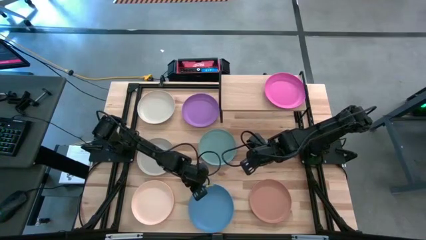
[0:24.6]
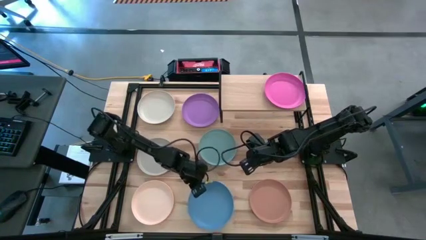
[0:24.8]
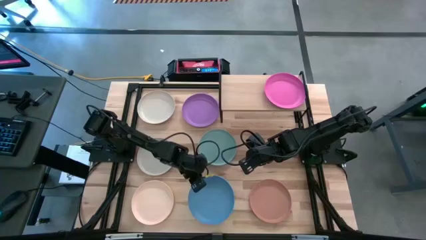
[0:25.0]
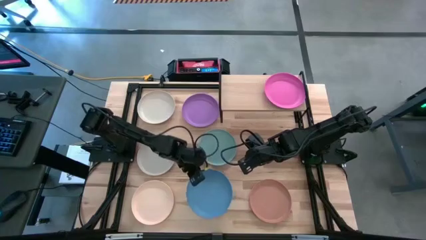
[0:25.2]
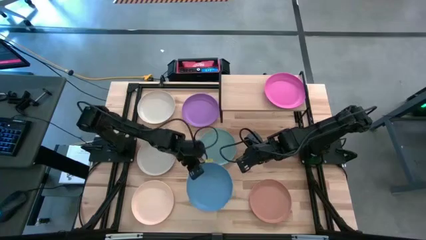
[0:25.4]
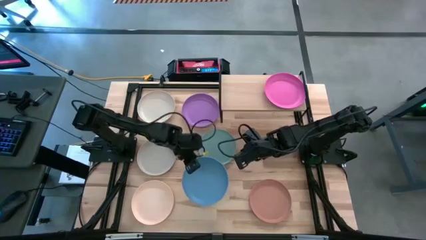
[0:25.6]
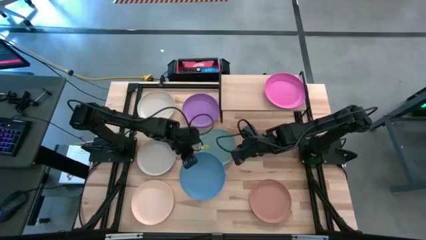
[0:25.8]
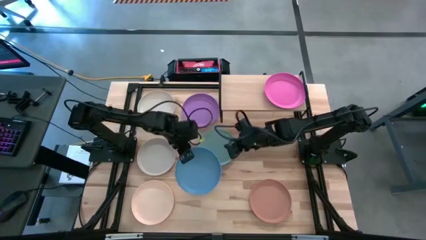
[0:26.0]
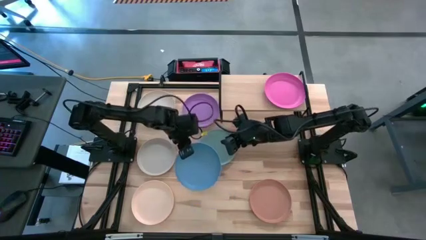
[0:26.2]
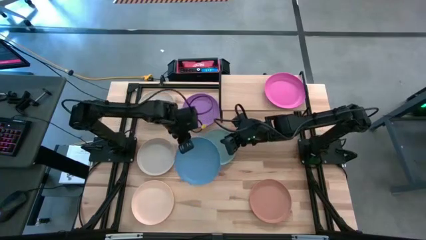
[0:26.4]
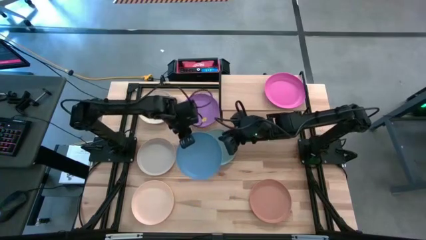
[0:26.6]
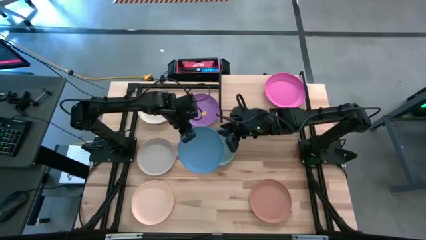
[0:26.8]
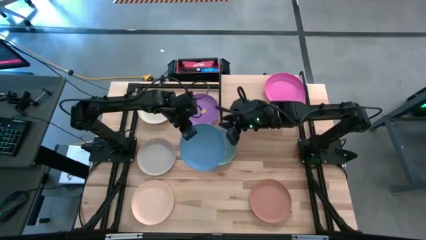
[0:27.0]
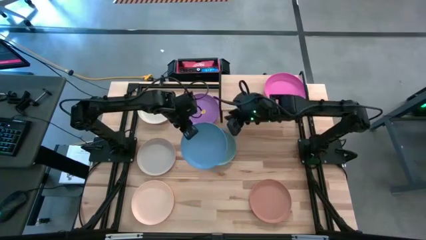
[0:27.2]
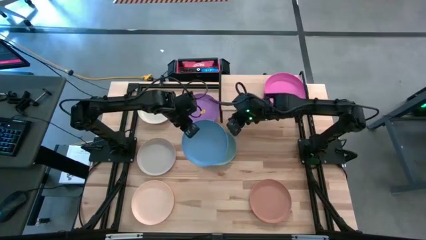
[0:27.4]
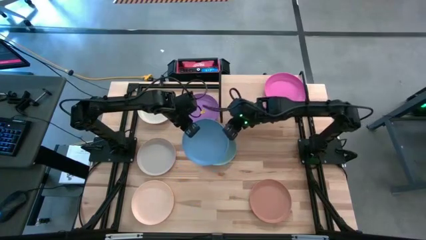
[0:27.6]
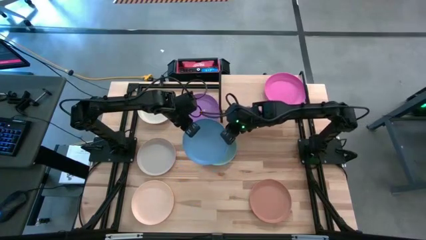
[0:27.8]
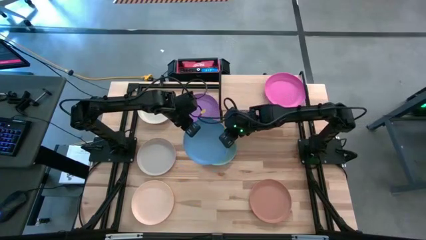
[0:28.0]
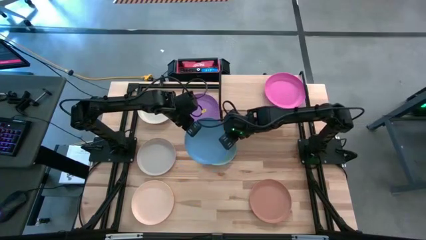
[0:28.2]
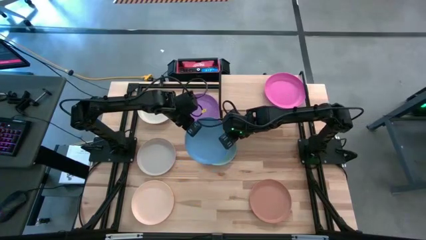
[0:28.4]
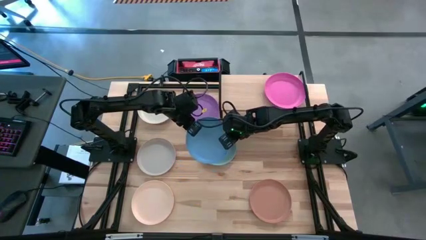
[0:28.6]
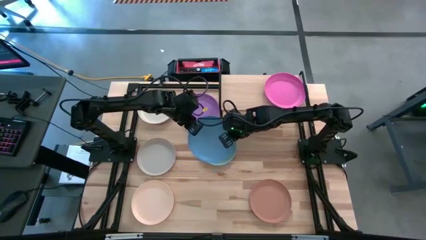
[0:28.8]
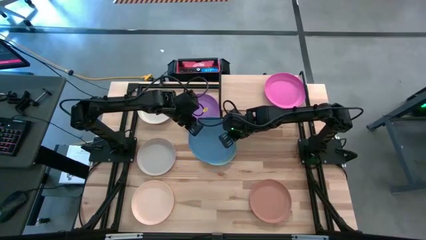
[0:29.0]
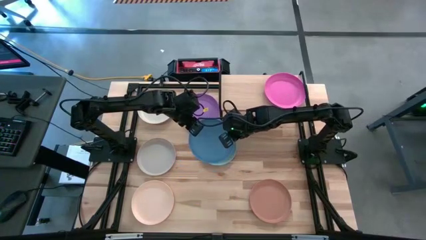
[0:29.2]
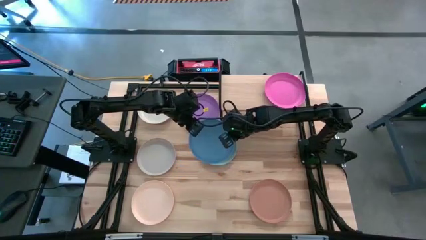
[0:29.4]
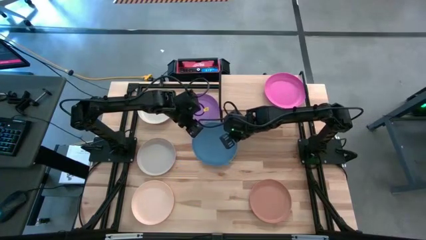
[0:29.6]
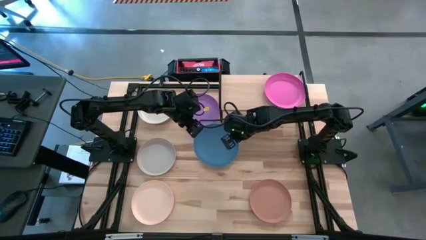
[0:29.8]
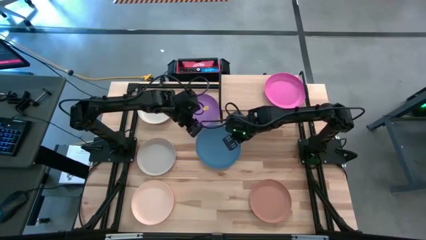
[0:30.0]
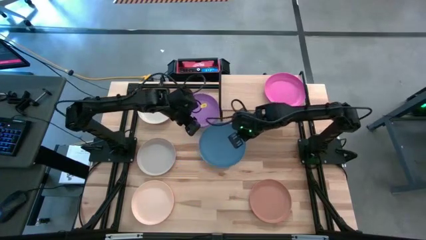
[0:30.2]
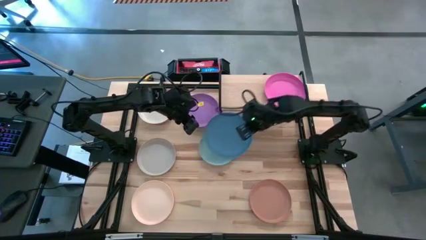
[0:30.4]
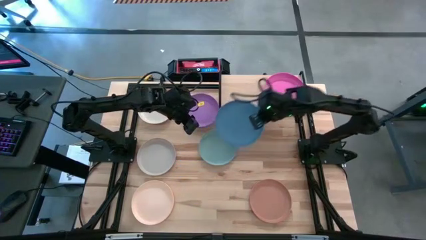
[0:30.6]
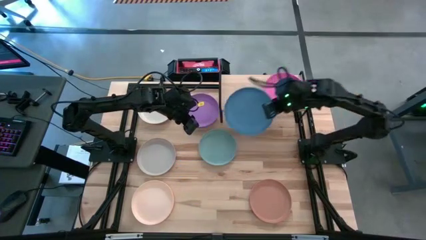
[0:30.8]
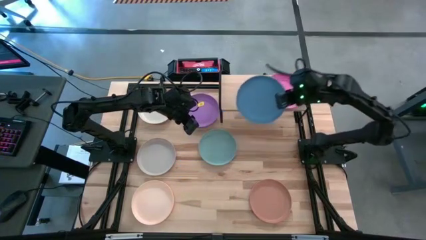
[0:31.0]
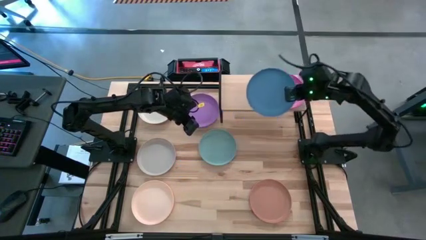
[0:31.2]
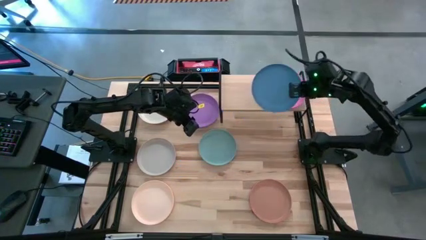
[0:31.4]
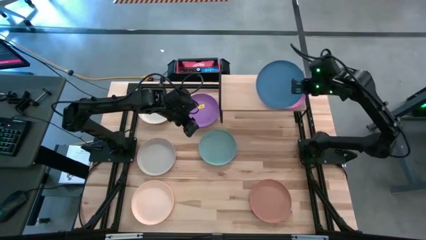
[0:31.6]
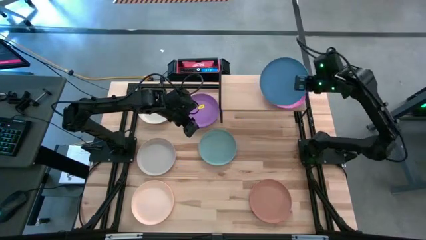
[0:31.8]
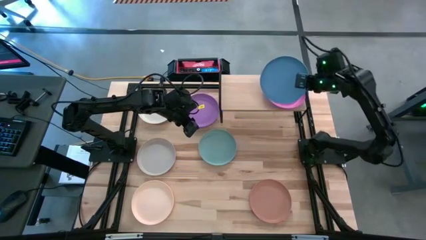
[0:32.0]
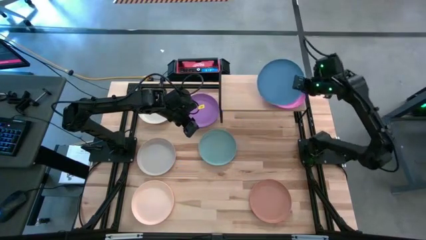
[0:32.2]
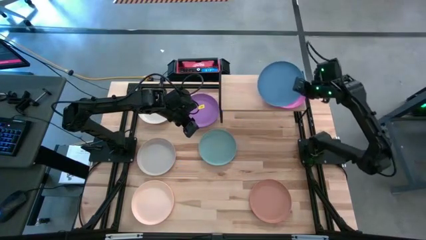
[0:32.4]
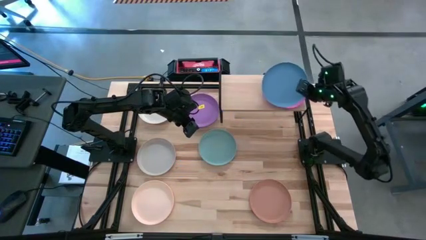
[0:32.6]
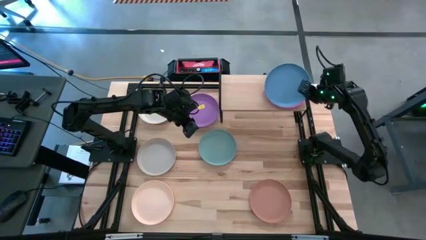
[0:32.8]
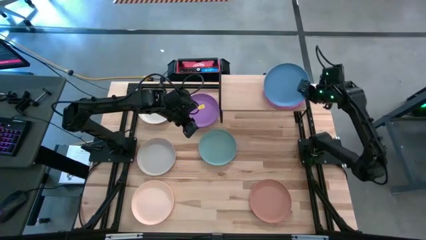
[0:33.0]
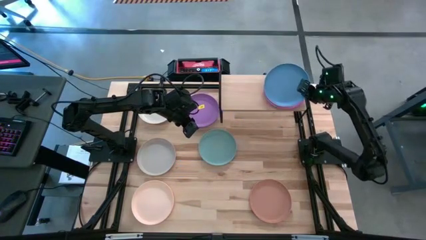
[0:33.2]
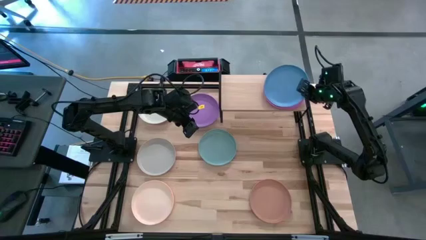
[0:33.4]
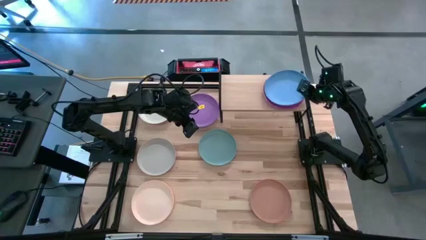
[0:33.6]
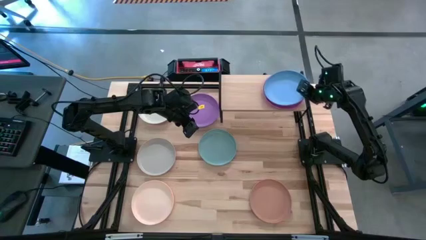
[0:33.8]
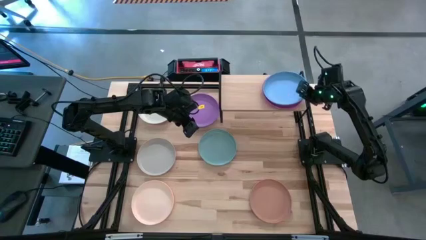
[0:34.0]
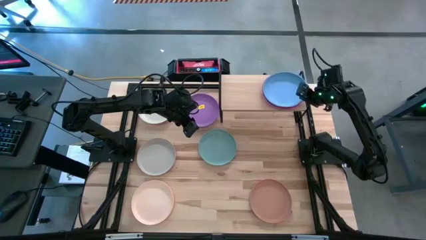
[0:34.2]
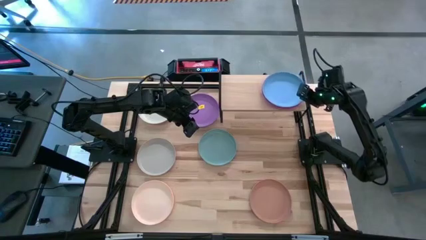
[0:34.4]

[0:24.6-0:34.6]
Task: Place and stack plates onto a shelf
Stack the blue plate on top of the pink plate on the shelf
